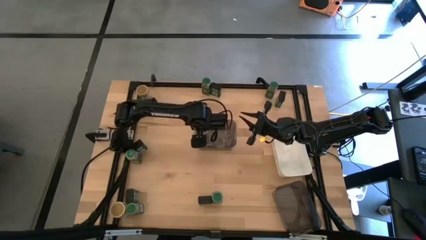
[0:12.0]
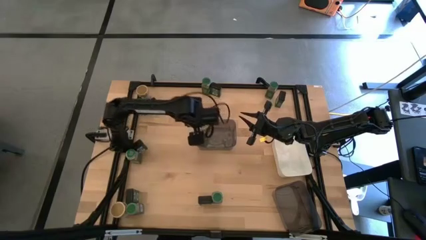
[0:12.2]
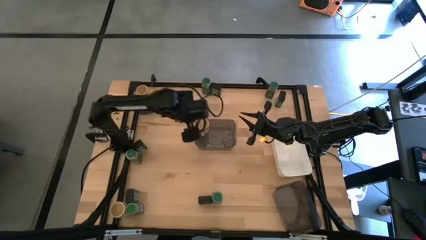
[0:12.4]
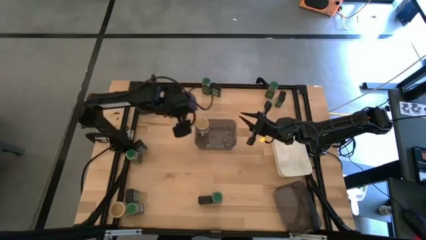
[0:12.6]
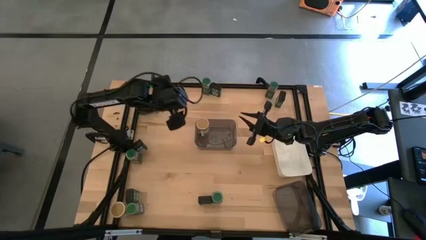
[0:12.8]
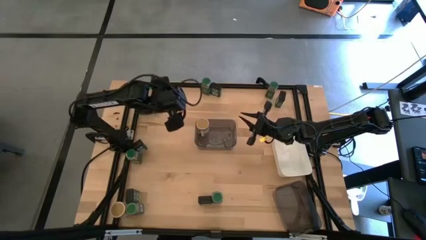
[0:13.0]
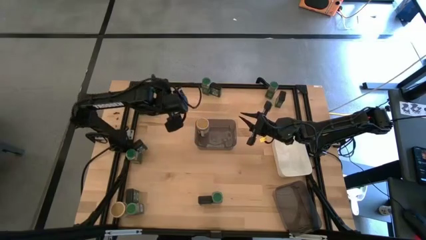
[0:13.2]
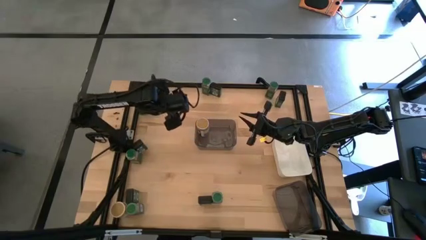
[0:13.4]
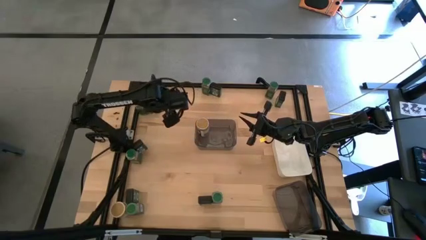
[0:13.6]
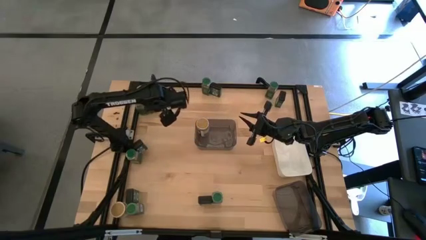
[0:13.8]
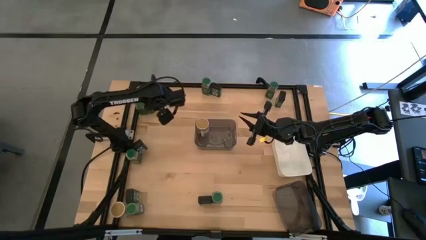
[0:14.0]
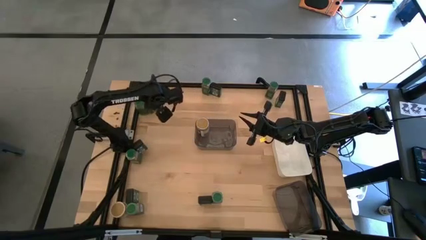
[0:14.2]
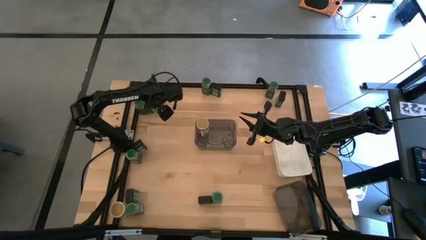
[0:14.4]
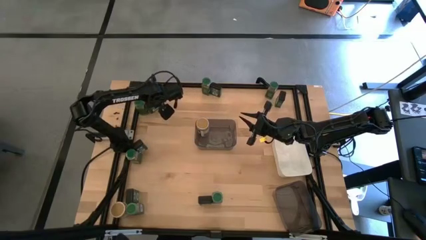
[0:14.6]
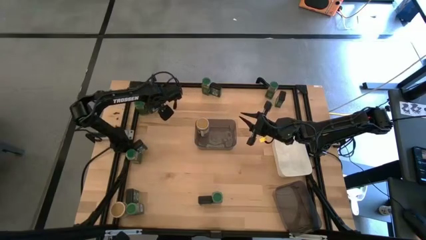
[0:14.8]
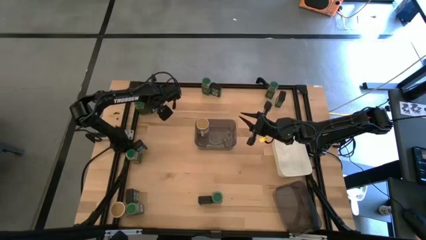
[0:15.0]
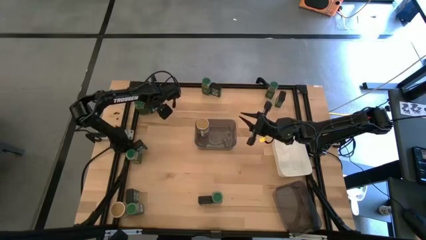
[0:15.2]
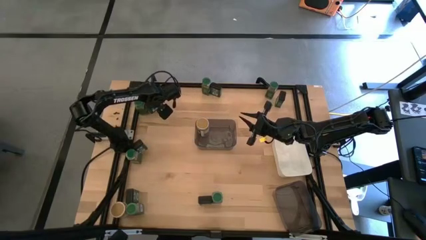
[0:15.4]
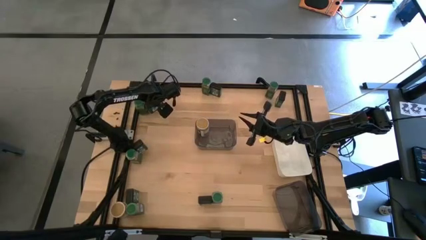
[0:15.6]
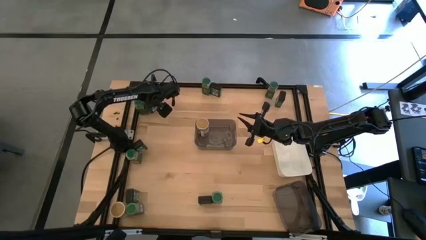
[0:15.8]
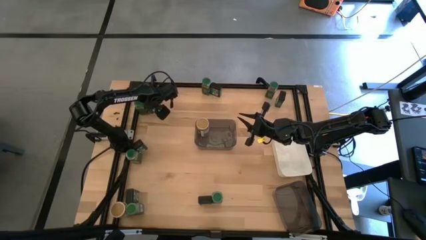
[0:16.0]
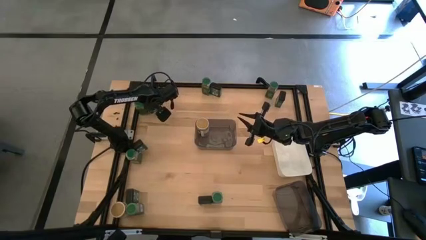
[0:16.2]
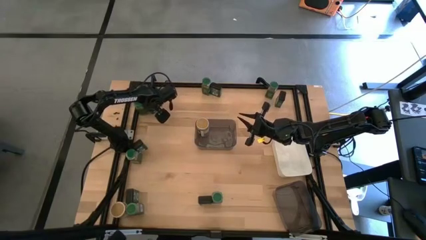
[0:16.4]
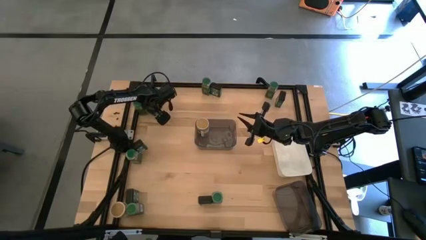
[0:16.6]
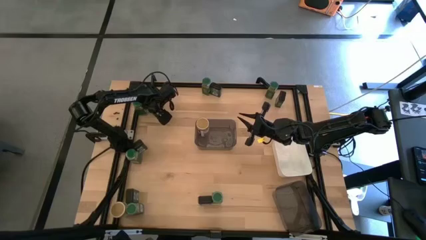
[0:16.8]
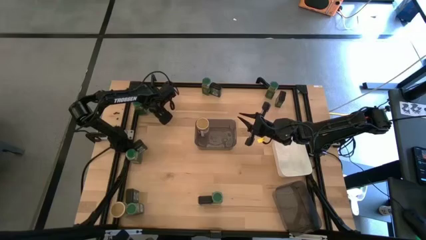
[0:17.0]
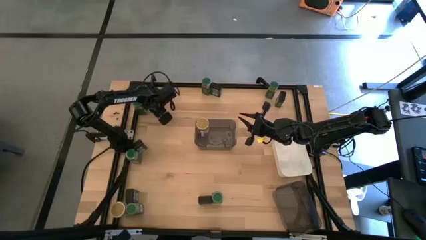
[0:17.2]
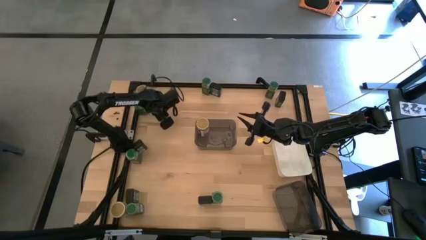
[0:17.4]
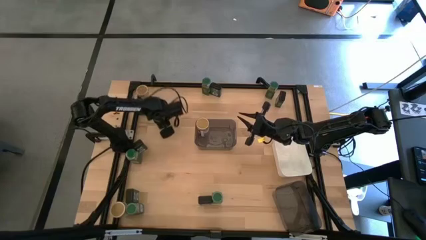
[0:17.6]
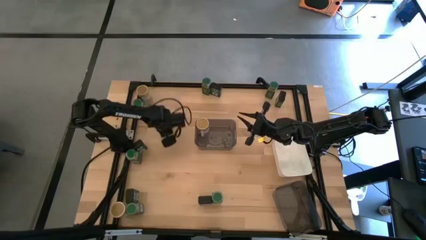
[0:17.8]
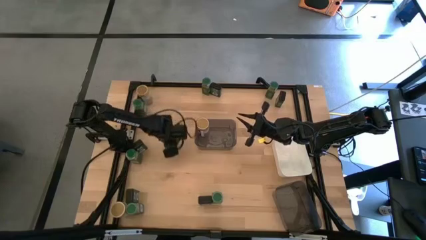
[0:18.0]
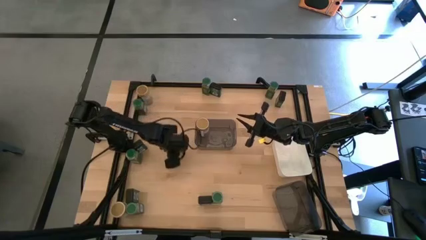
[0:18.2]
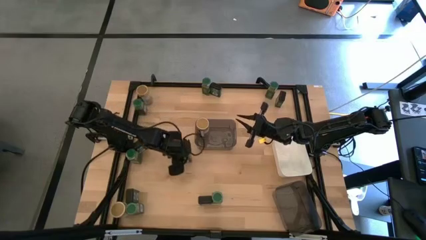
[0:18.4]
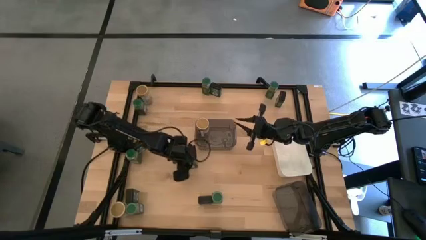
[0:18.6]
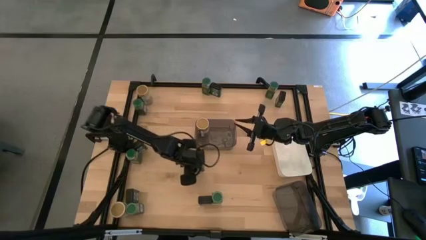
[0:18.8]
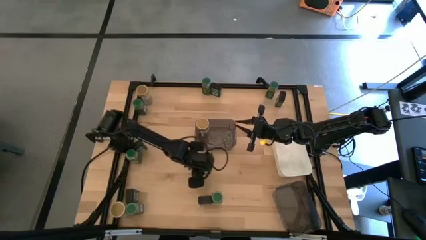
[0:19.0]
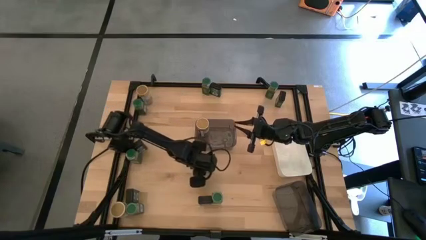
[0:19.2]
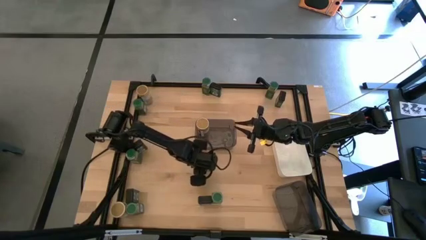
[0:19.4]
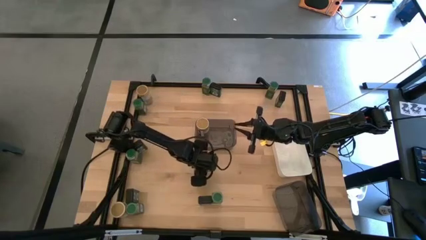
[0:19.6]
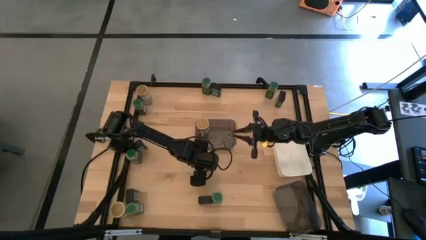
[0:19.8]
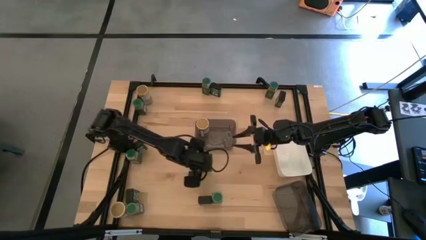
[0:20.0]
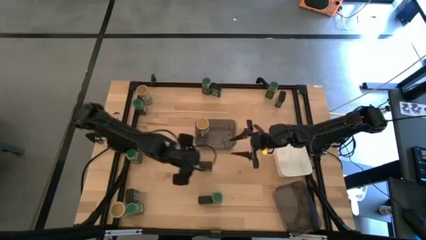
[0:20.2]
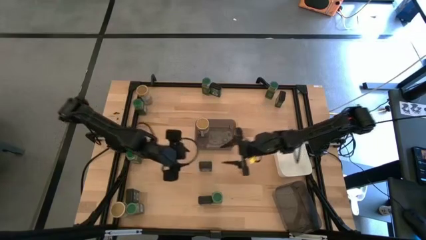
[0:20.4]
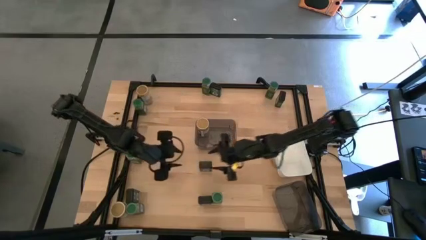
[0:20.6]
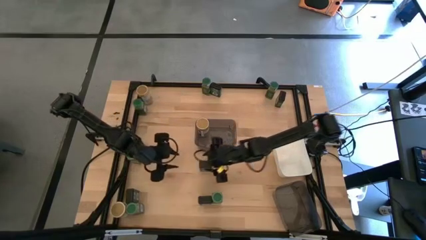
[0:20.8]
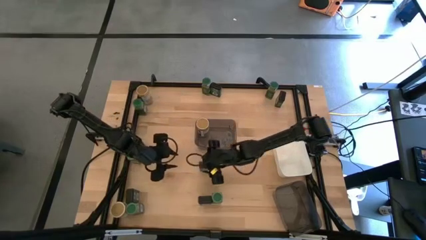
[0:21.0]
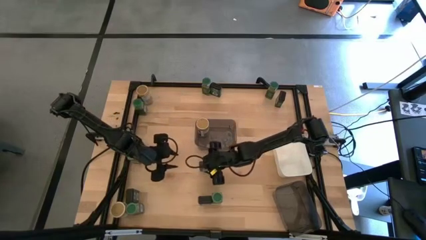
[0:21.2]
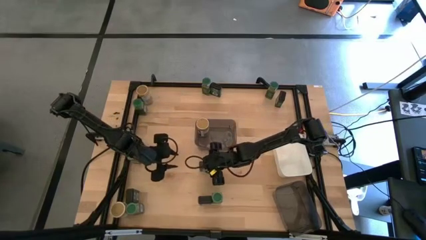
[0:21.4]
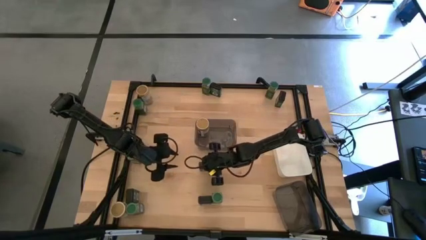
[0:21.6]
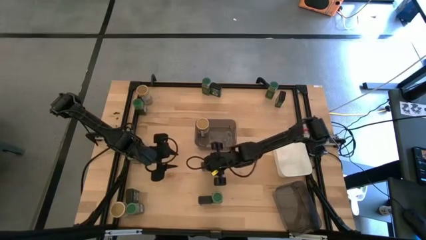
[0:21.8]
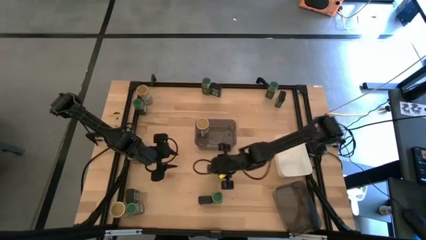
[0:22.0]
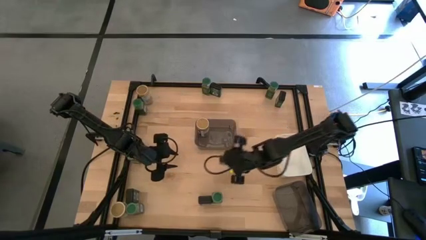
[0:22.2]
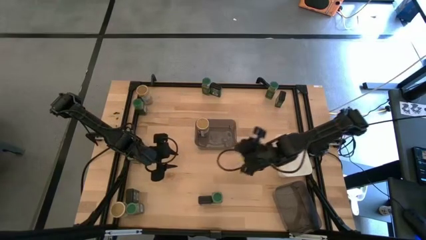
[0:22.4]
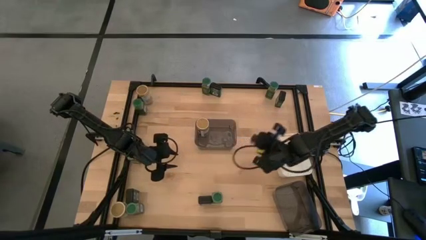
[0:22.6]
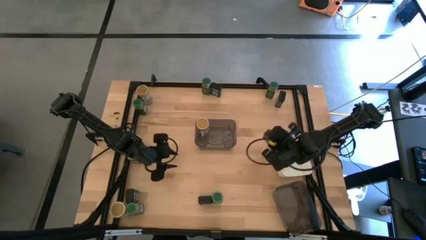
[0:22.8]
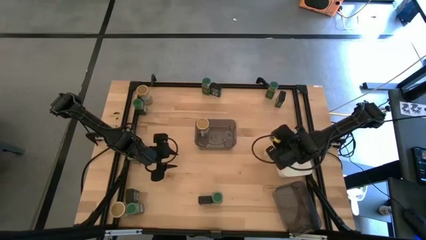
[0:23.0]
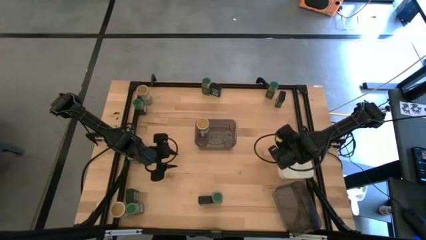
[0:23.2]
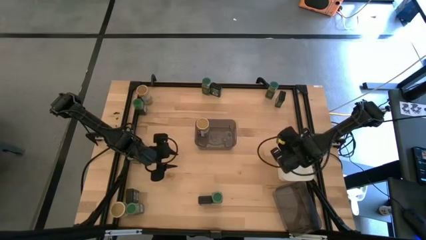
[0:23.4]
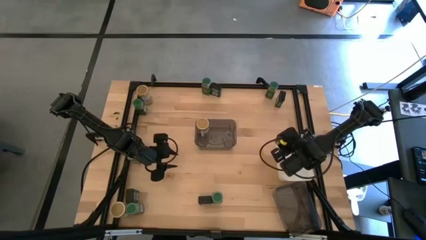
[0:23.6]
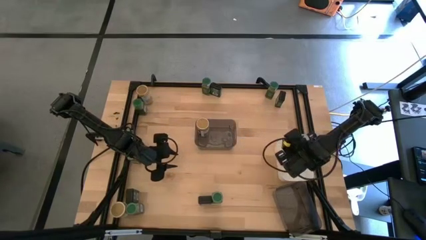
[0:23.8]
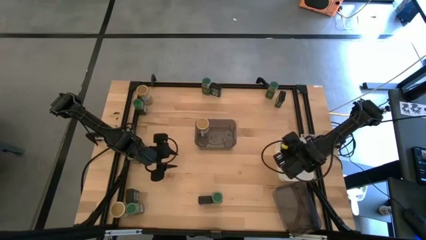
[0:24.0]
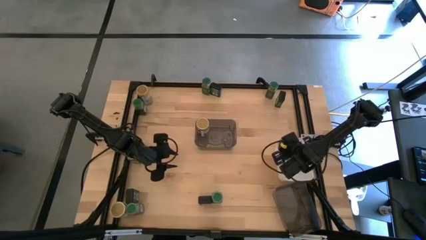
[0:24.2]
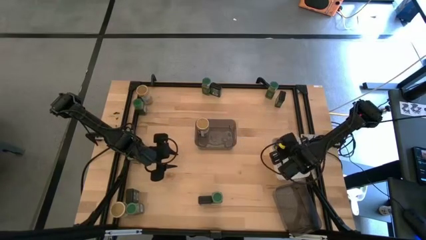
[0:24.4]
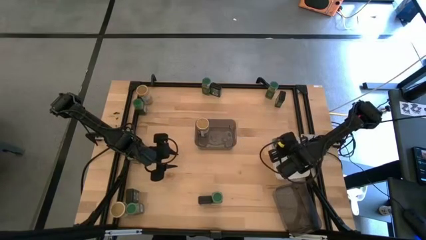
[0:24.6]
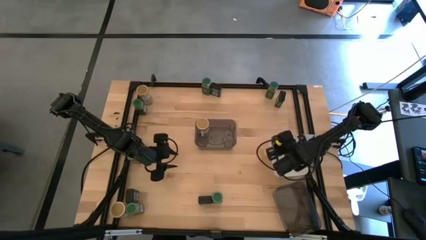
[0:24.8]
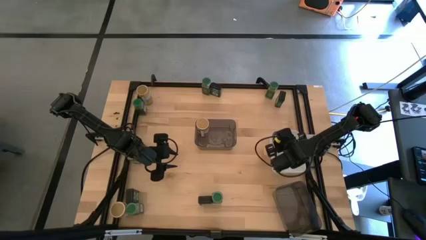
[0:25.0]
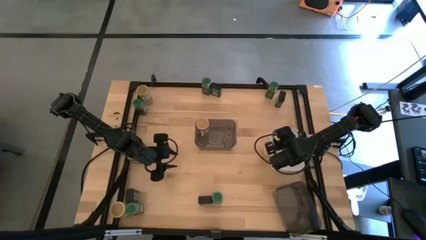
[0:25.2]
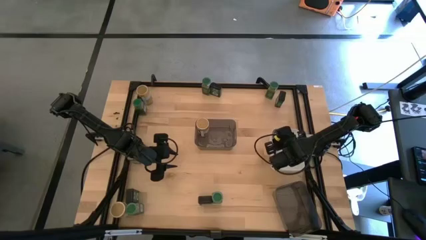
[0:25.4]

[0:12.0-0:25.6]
Task: Sort spices by type
Put the black seasoning can into the white bin
